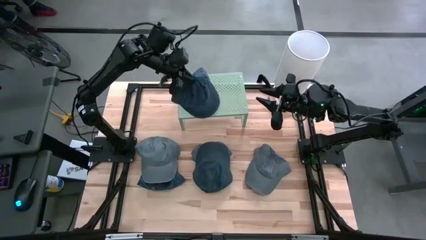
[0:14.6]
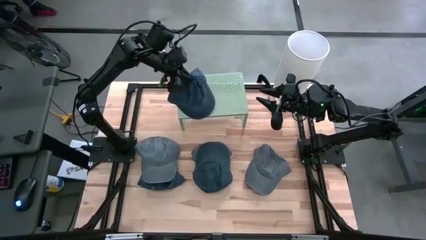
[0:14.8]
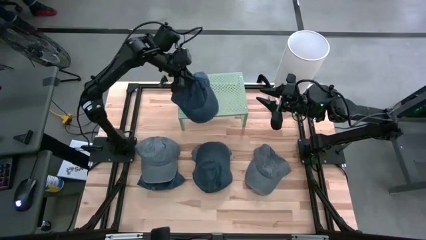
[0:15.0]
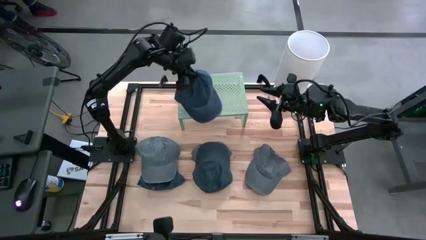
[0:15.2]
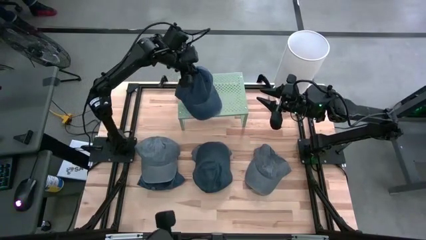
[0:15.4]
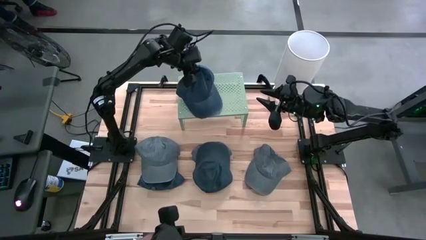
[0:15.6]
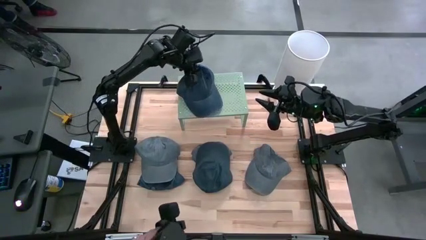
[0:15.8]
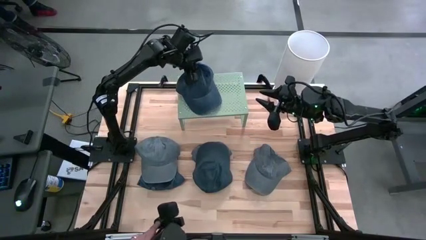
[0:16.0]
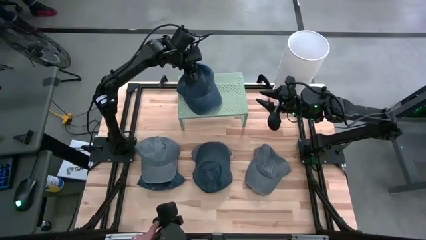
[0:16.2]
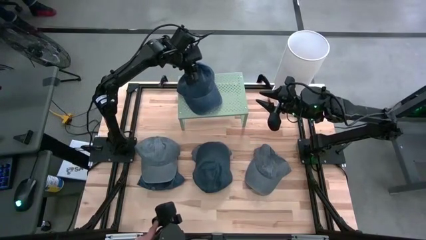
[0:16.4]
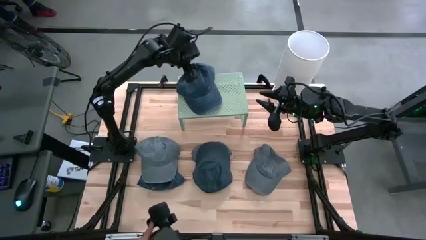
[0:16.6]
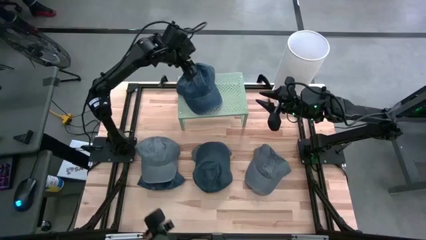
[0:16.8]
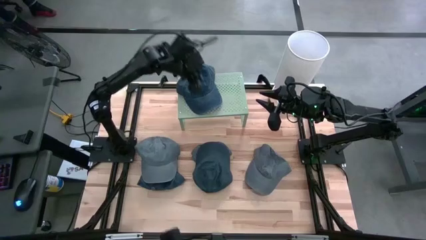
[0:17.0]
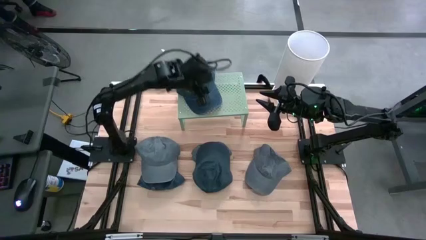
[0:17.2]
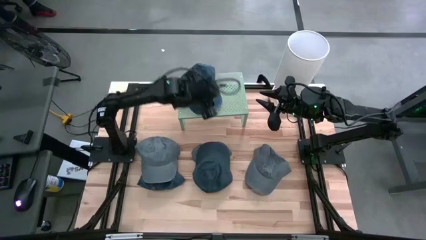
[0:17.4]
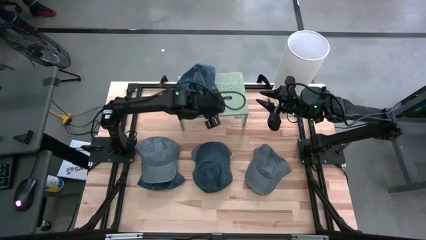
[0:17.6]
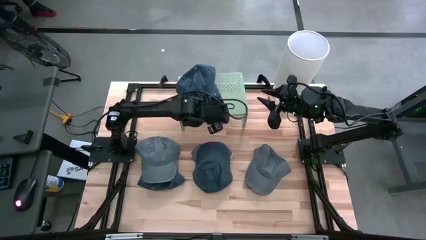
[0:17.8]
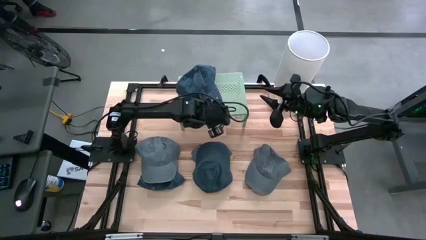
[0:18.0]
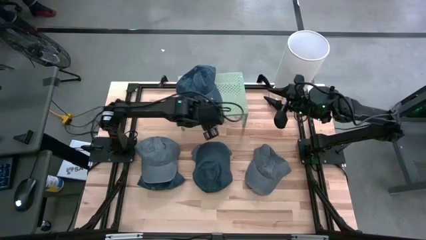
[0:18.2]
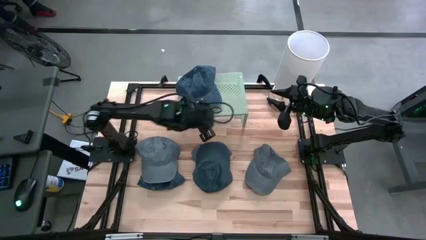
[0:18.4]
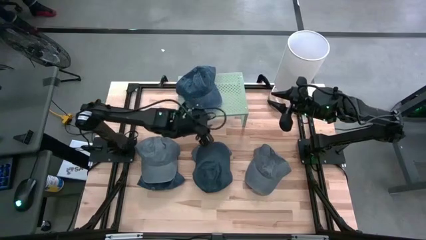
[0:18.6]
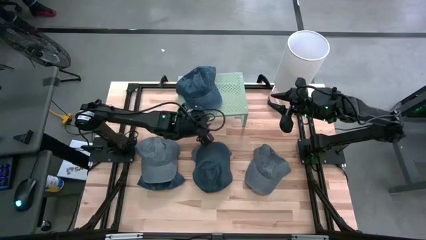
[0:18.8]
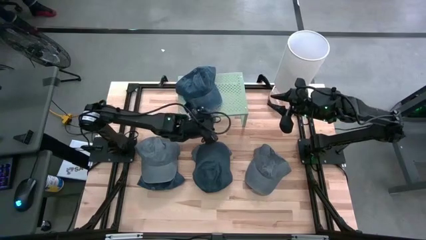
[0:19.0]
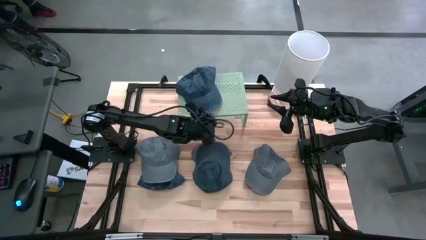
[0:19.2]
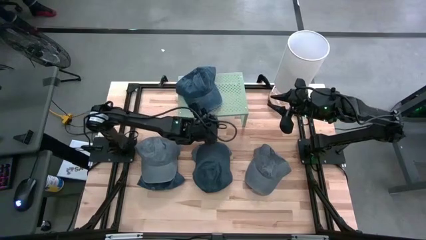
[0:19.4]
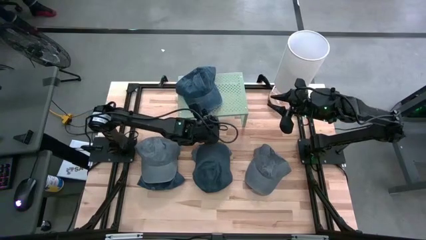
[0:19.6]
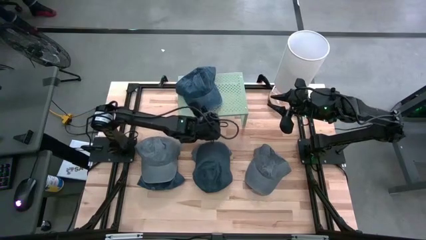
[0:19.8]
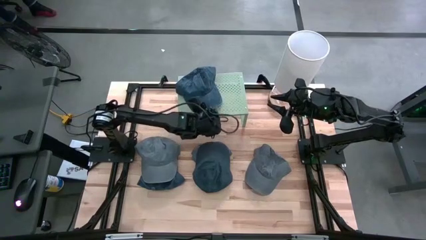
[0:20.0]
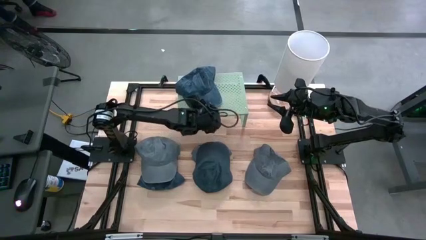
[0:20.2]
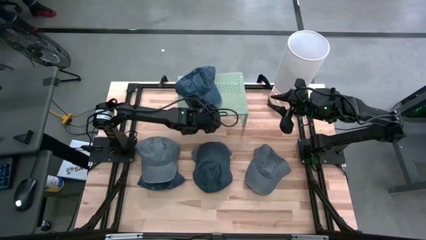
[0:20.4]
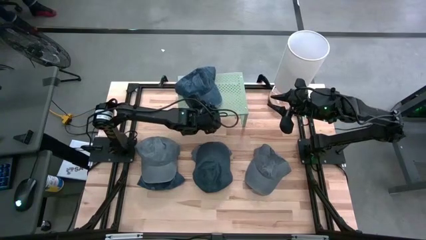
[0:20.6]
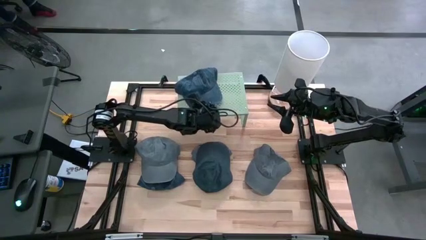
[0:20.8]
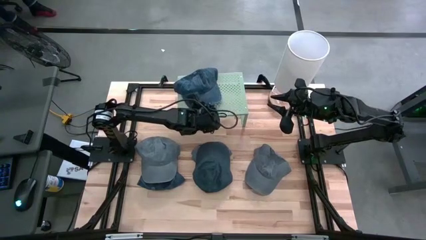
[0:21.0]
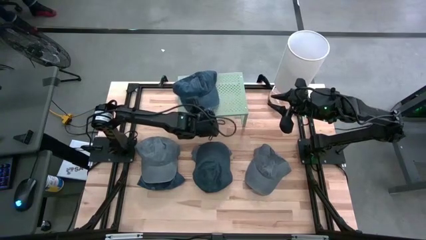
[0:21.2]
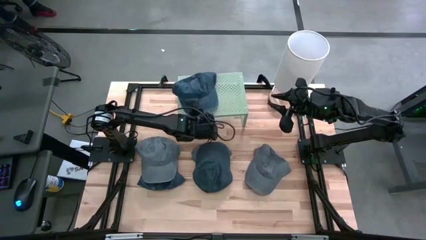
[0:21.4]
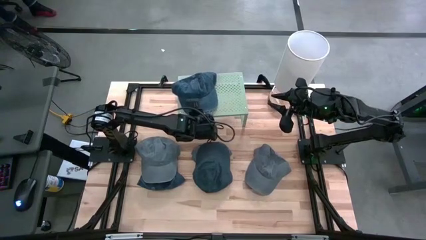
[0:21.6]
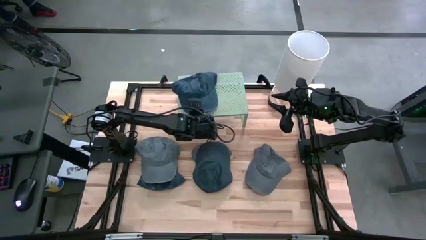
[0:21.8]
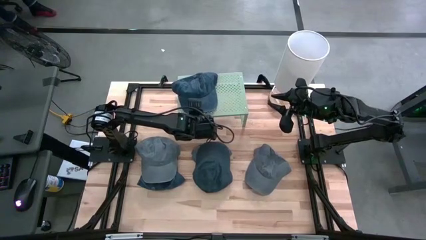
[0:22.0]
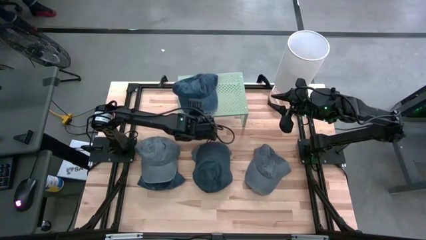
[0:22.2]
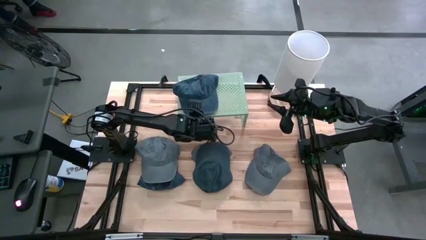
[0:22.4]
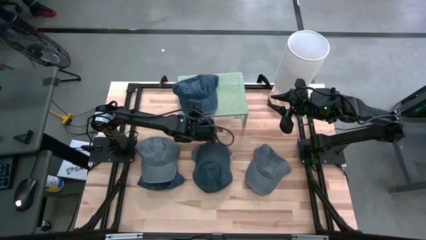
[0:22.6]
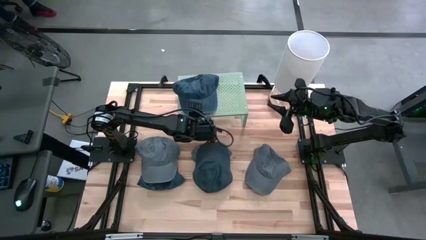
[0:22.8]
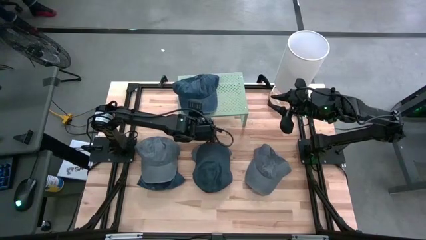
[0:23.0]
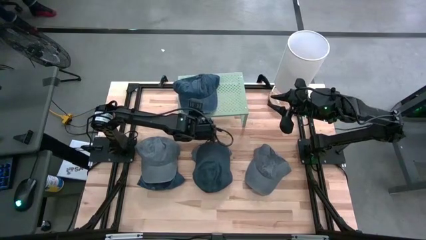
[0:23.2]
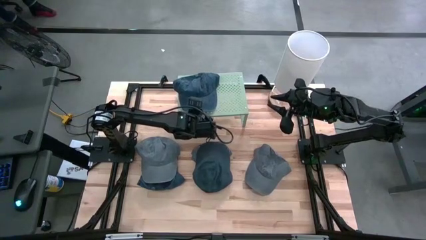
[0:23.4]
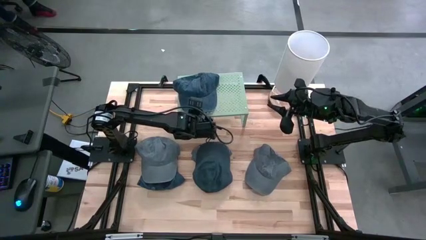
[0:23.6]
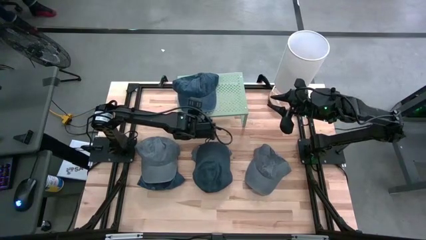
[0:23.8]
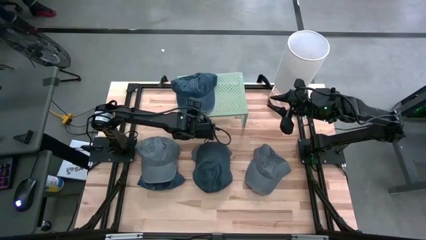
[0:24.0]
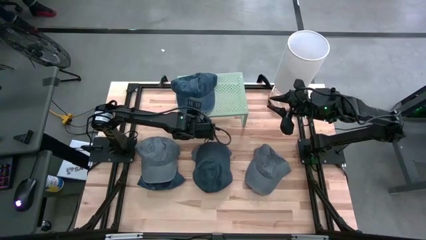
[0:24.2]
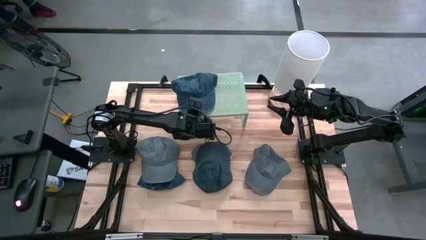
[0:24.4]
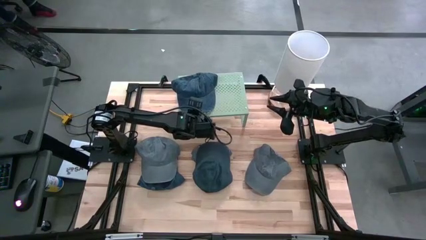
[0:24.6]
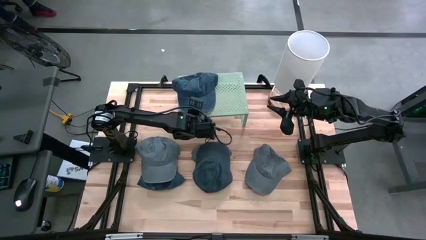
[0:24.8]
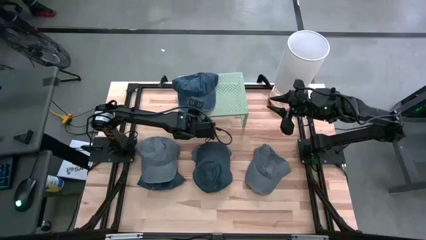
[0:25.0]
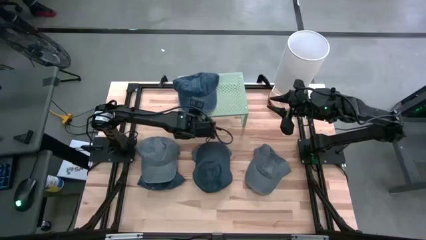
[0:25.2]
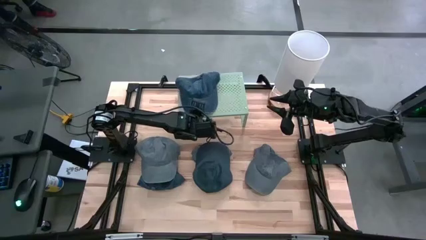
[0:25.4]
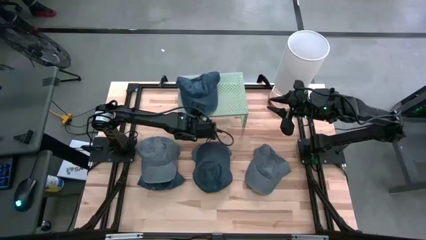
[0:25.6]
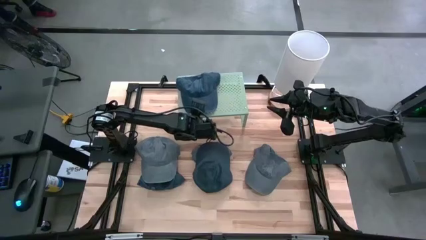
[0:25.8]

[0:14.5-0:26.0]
Task: Pick & Place hat
Put the right blue cap on the shelf

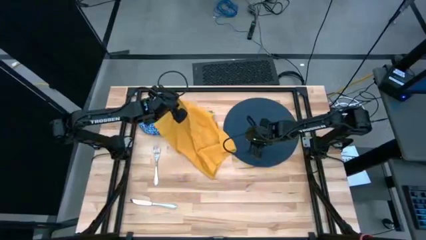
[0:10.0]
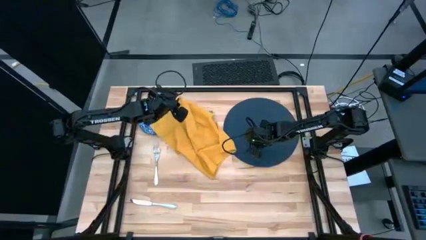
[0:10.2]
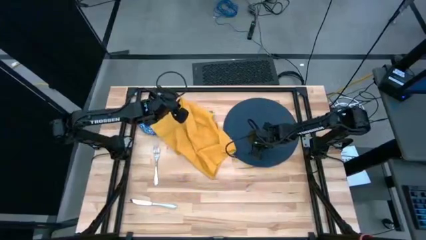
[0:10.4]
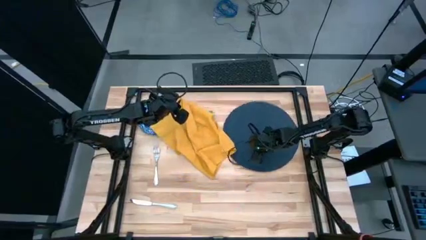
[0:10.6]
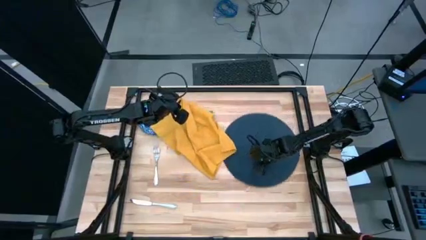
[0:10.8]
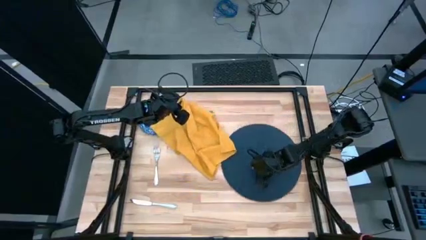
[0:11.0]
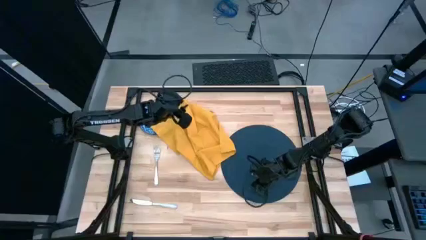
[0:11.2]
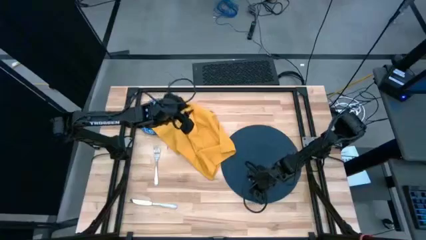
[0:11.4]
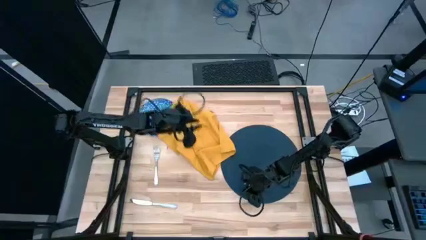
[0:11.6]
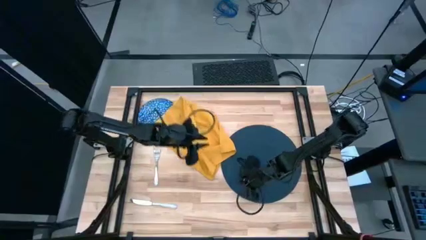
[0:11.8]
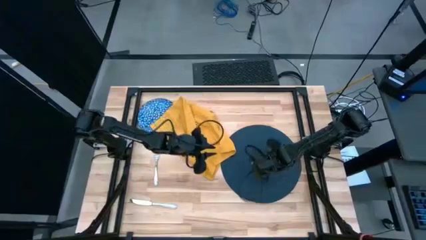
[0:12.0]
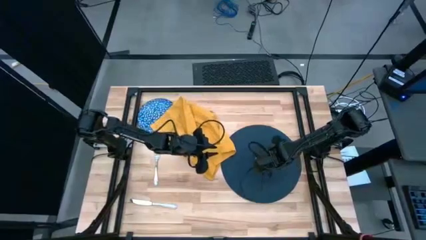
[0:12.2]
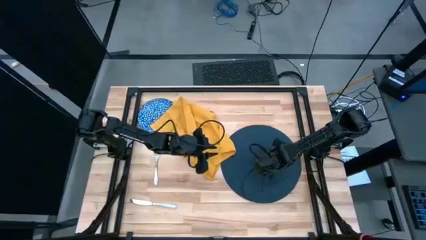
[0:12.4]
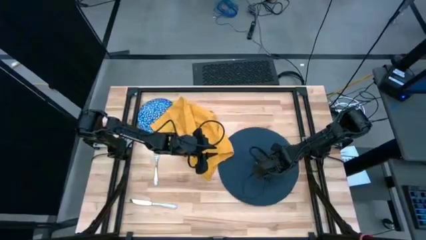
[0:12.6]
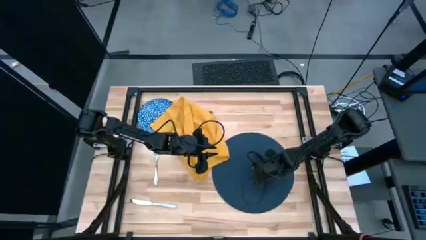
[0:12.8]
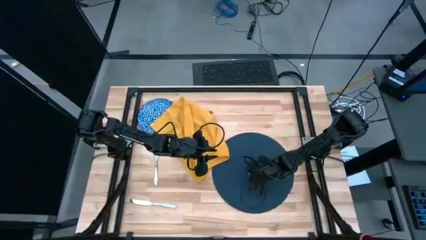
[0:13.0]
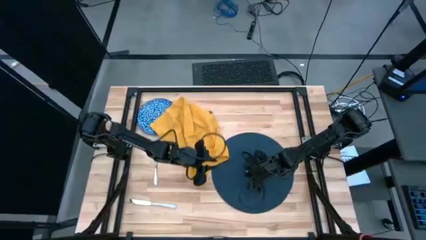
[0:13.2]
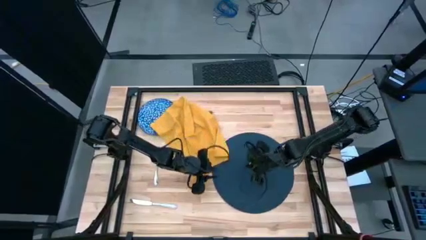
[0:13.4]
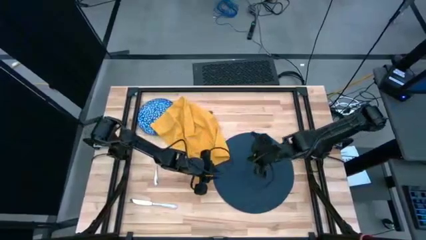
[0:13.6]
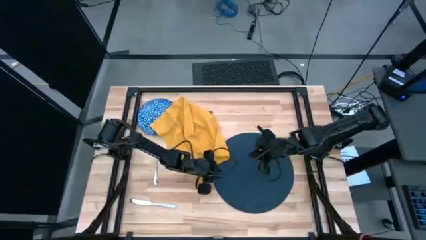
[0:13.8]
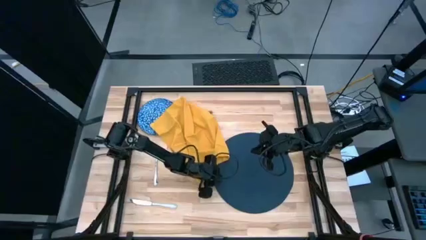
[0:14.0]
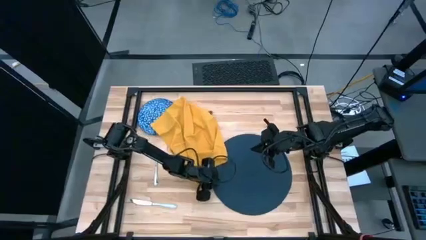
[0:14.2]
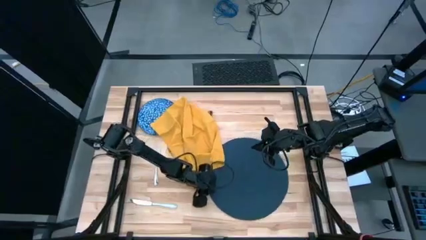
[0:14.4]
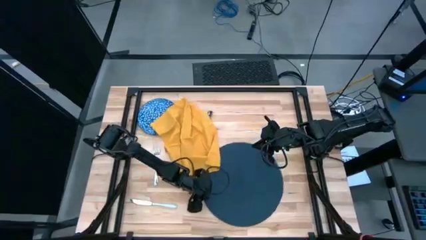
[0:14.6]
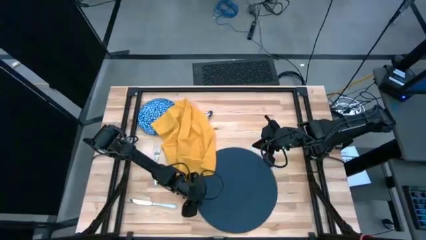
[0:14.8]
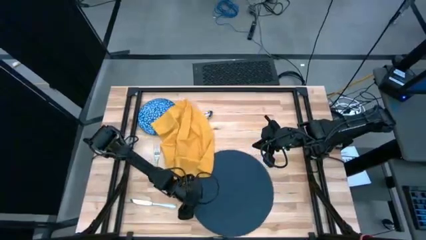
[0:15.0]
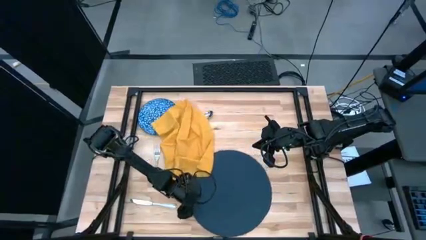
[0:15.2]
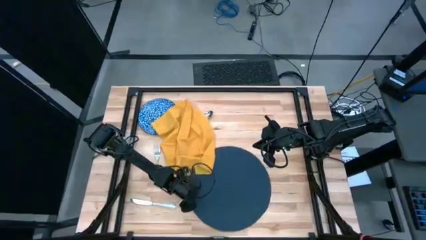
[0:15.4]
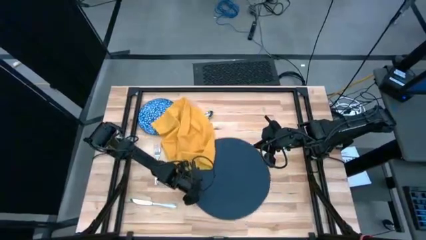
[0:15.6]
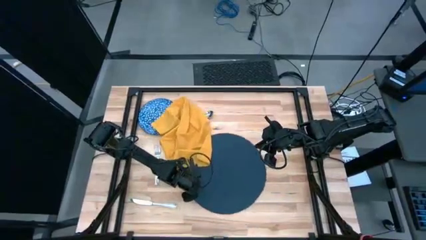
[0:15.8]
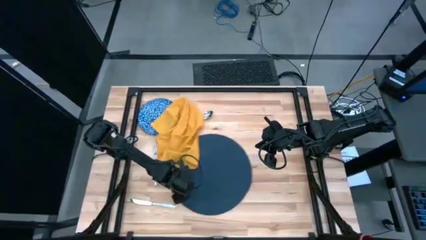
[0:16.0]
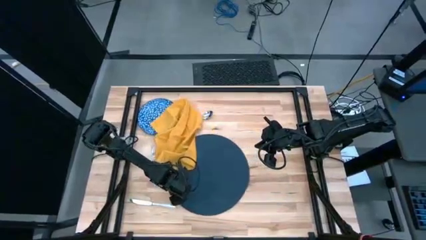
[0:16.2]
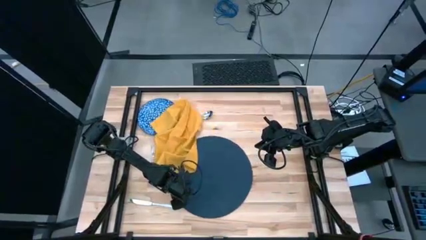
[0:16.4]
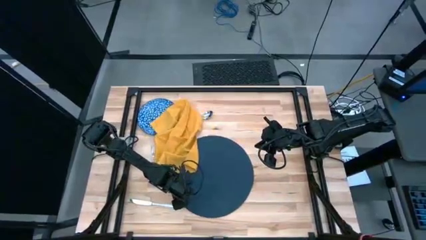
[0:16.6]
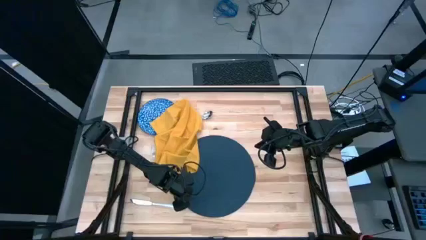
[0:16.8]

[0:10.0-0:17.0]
Task: Set table place
Move the blue table mat to the center of the table
